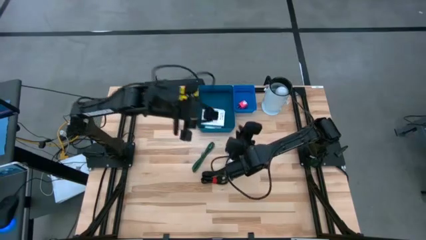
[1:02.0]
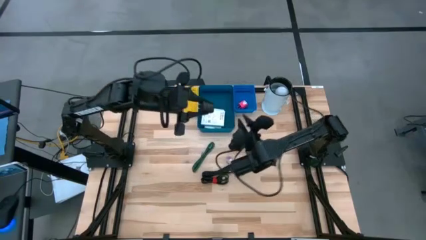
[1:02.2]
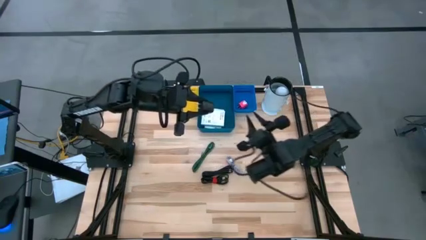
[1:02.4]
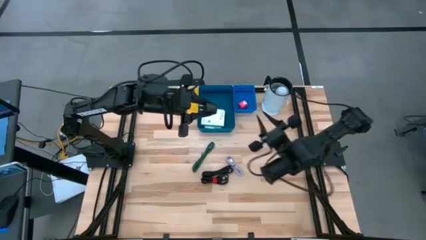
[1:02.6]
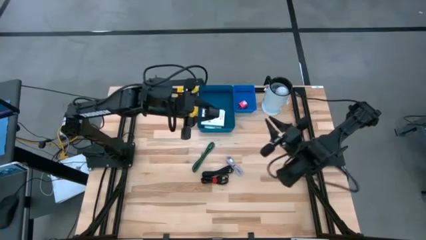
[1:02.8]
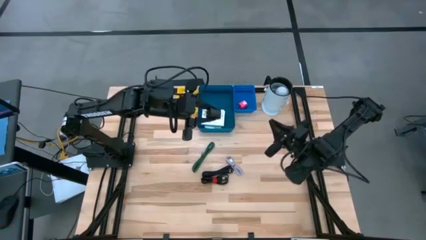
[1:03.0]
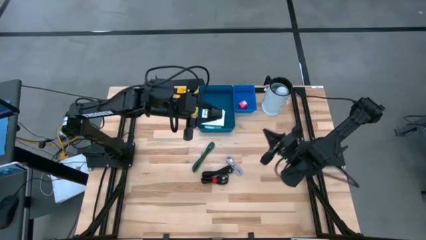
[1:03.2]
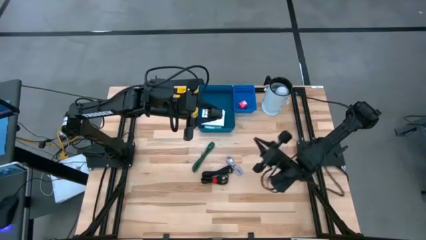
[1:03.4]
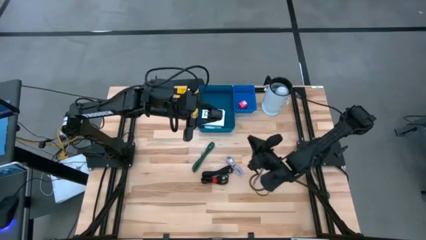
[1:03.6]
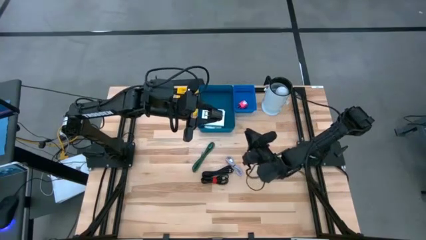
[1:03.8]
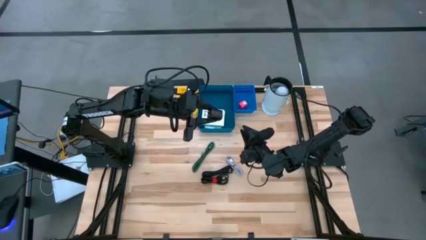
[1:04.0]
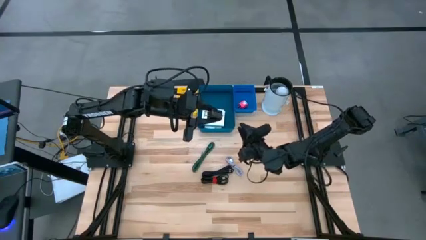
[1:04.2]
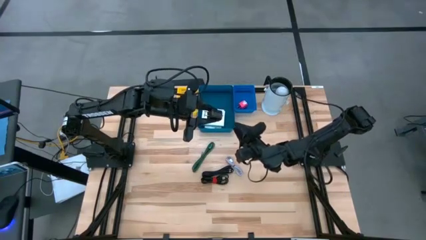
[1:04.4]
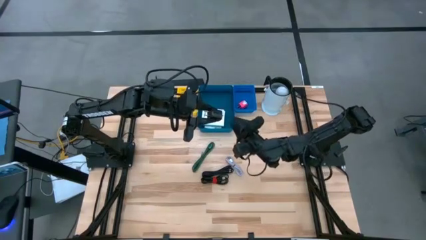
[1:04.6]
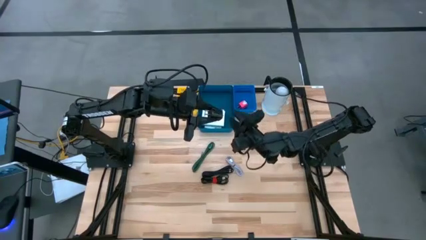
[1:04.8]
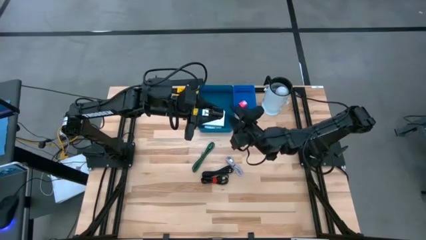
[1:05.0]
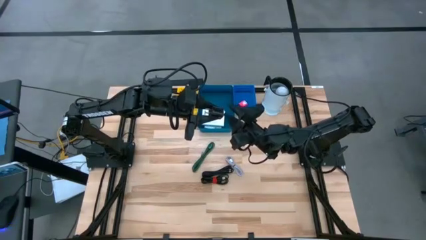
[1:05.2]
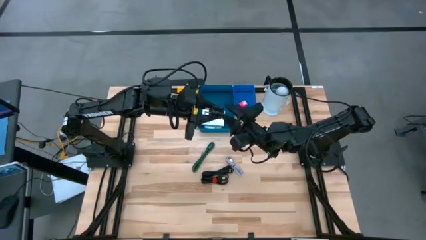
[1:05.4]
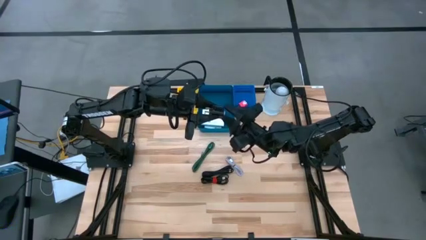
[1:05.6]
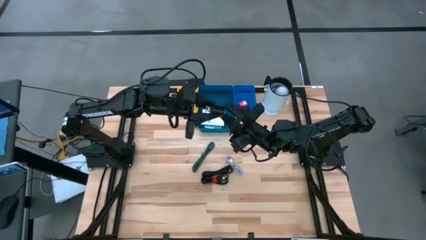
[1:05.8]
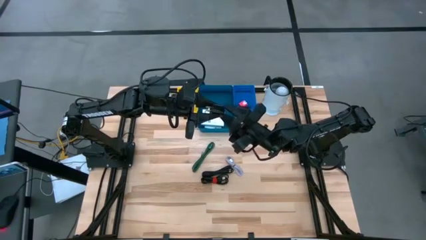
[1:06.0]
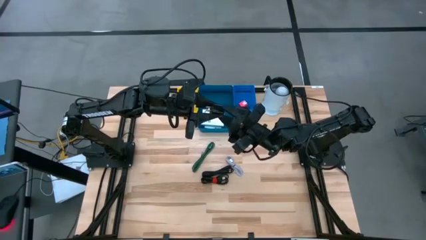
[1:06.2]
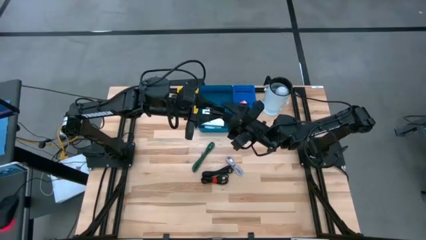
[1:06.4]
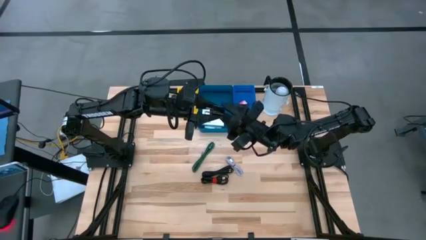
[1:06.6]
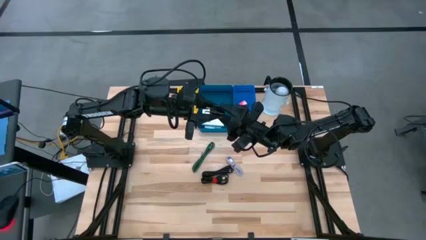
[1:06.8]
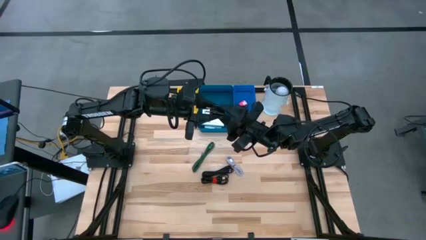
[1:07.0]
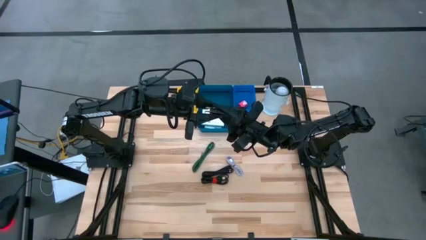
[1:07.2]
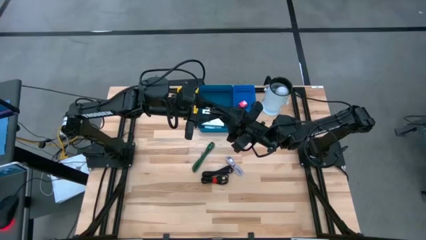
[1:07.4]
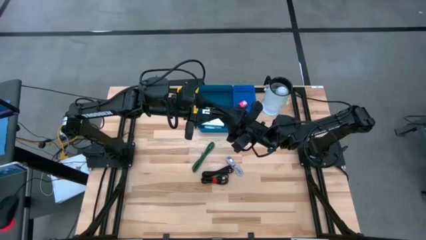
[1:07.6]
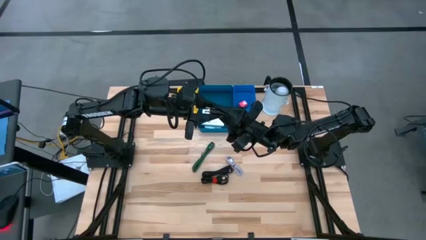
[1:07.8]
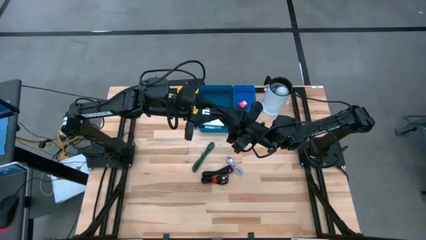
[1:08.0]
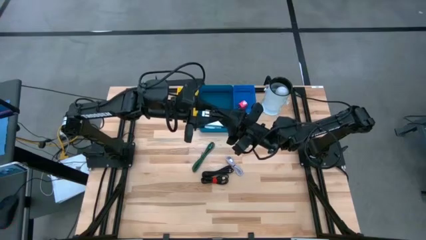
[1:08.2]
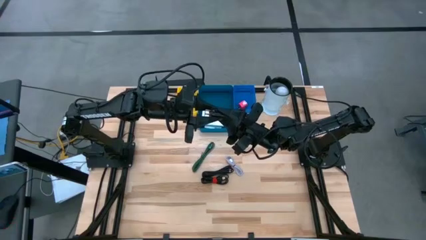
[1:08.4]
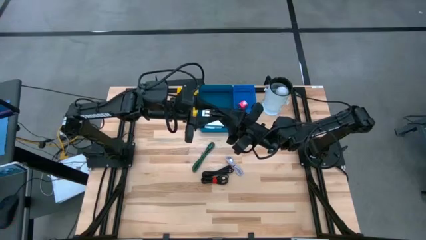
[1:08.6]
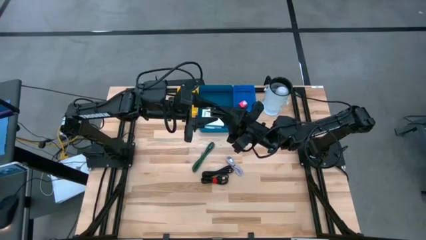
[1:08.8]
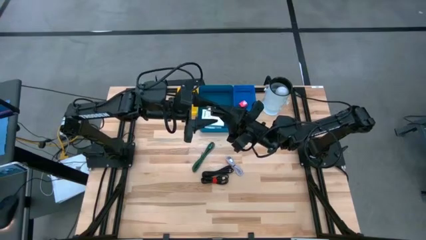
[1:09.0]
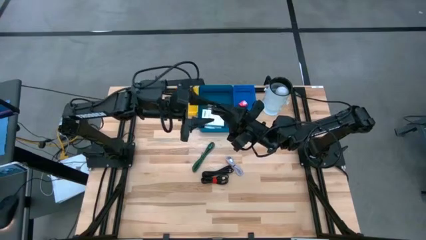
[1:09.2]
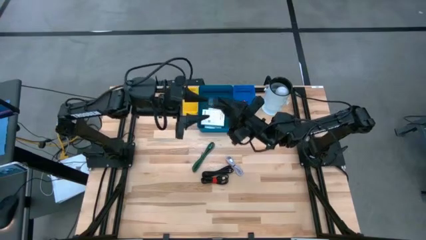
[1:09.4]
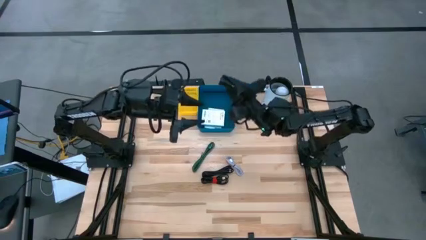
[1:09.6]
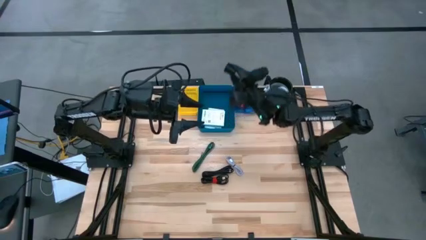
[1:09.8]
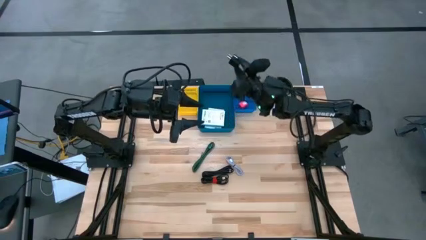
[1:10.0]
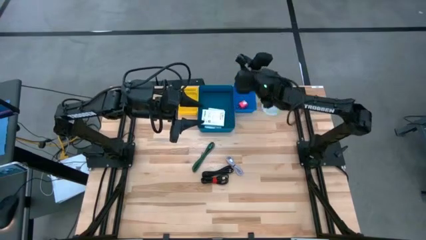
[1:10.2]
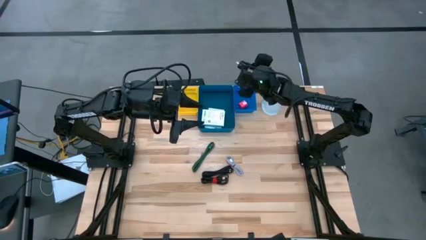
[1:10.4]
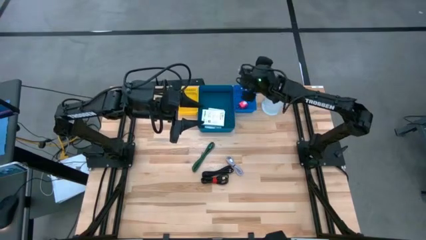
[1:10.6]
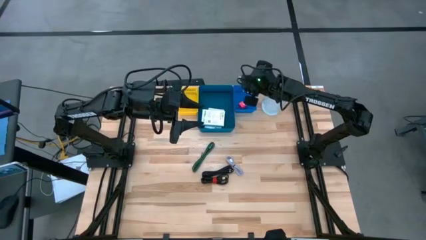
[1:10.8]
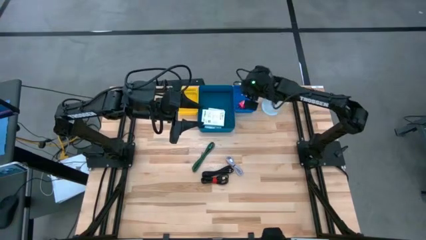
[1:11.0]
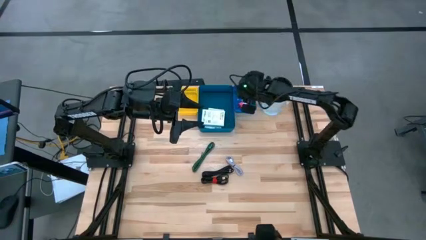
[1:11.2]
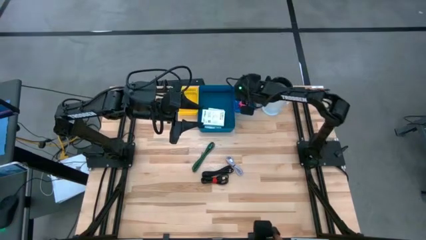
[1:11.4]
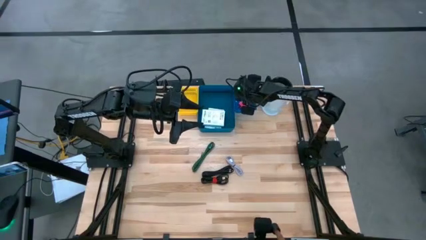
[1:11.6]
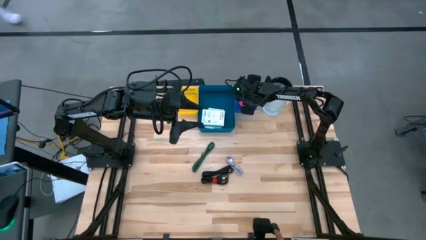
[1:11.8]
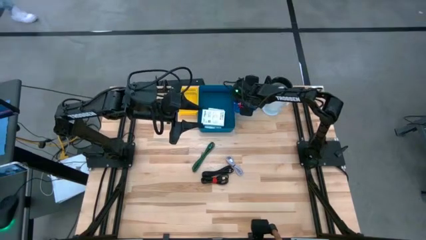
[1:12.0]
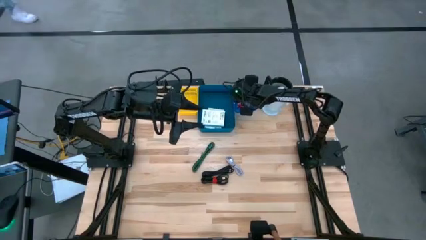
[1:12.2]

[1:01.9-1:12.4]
Task: Pick and place items into bin
Put the black charger adapter into the blue bin
